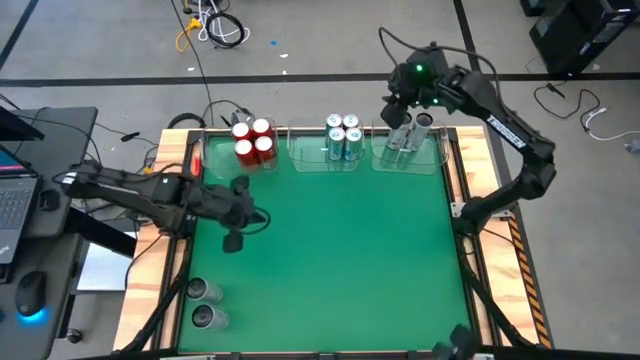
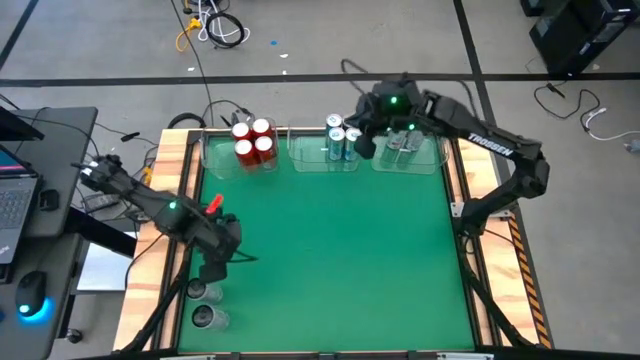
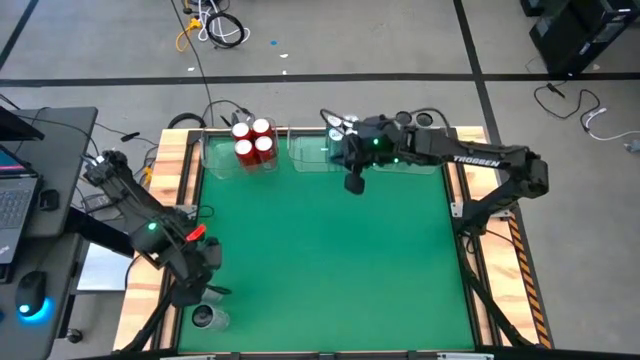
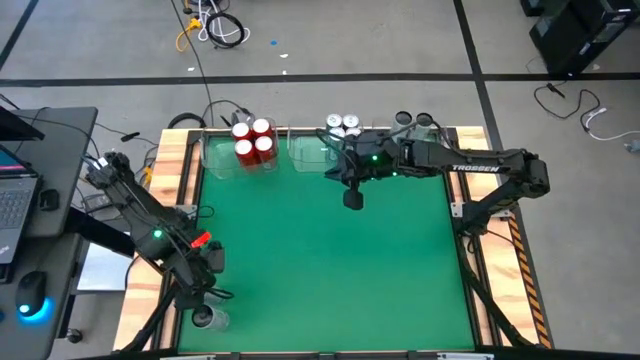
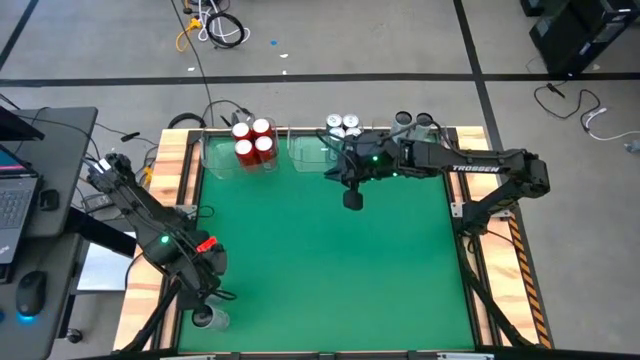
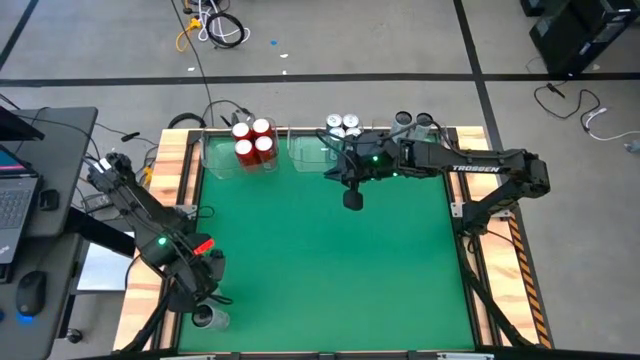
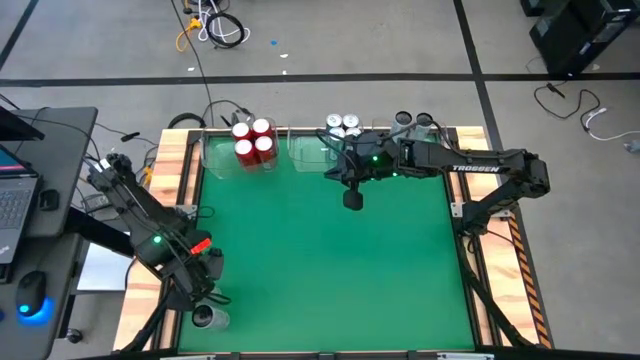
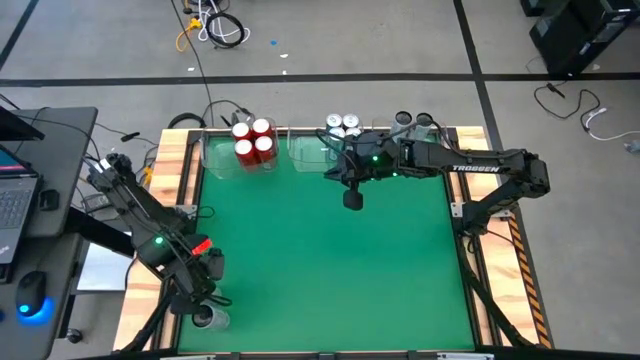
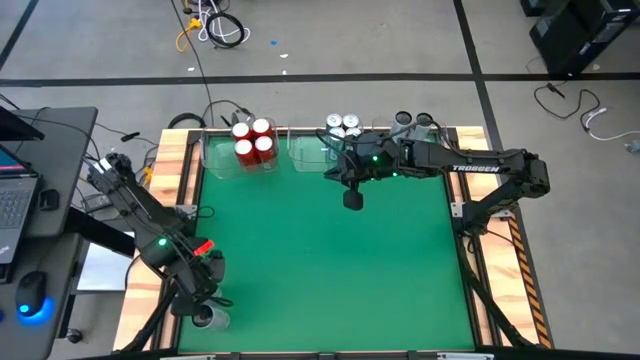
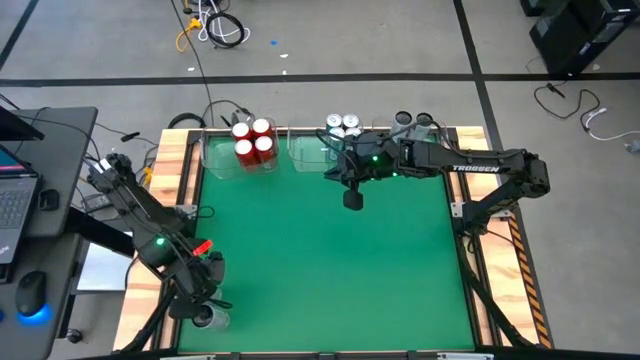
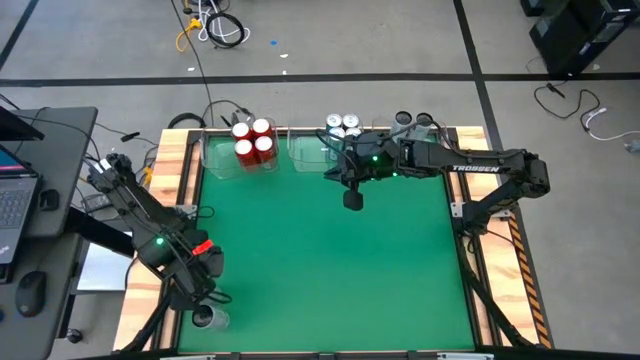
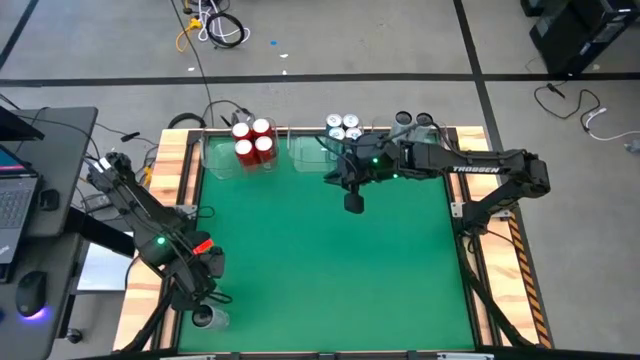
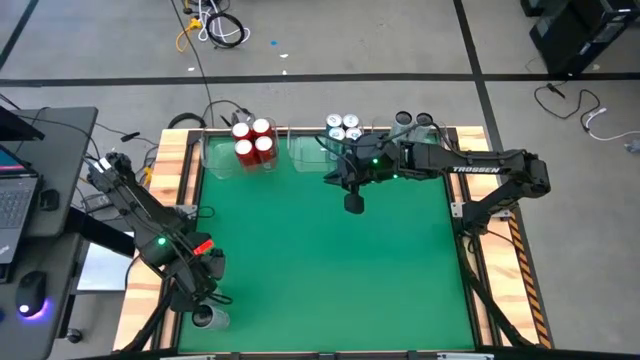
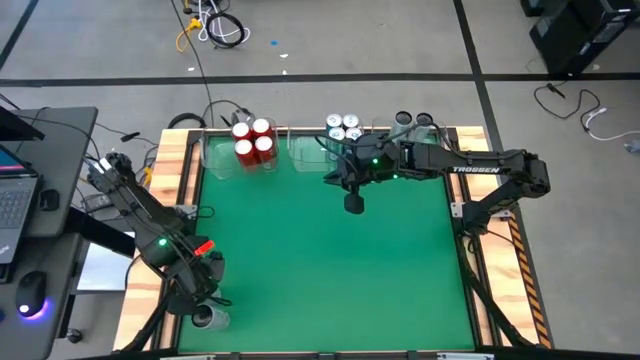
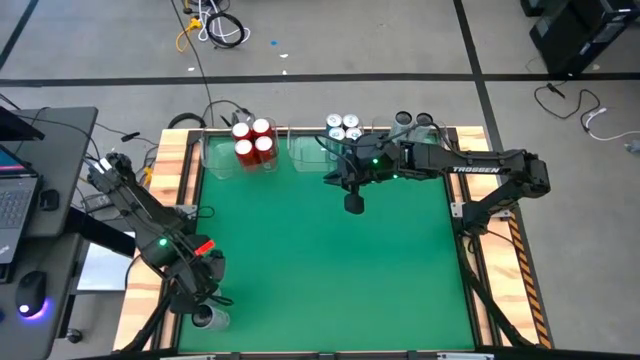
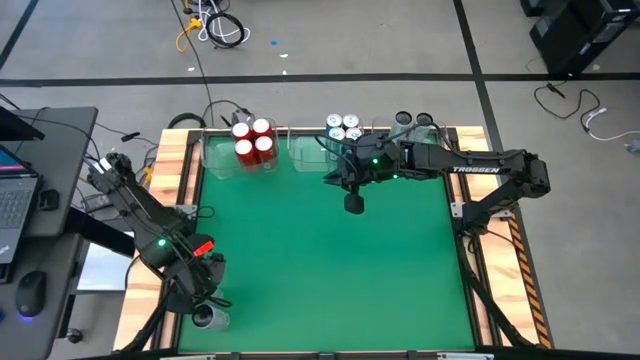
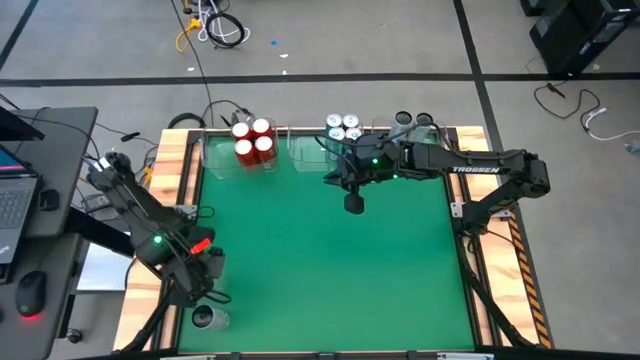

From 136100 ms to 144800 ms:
Task: Sort soda cans
Put the white soda can into the transparent right bin

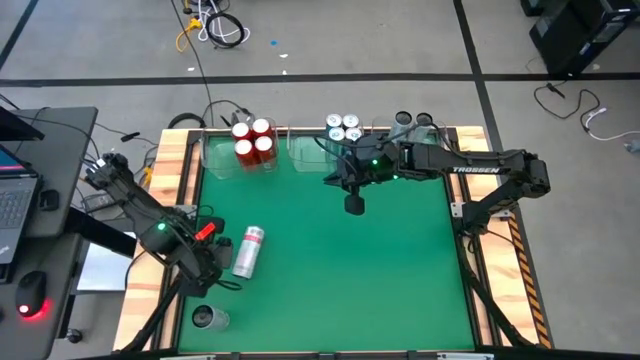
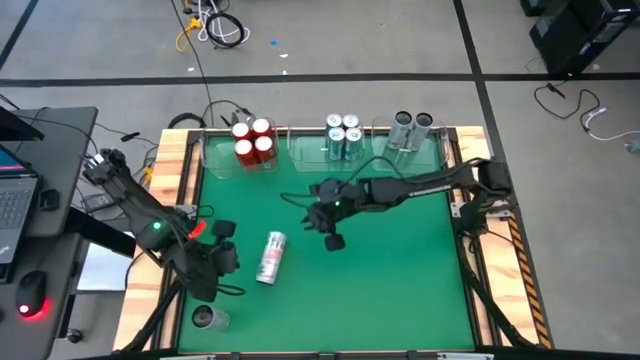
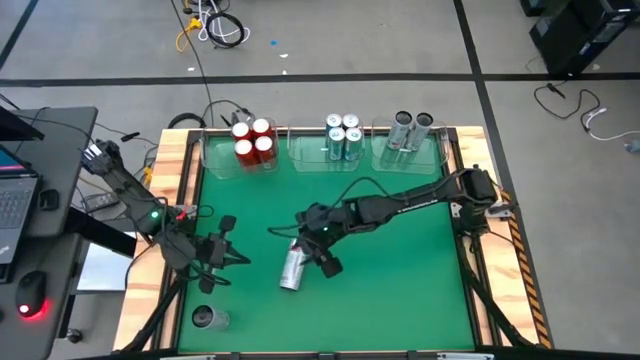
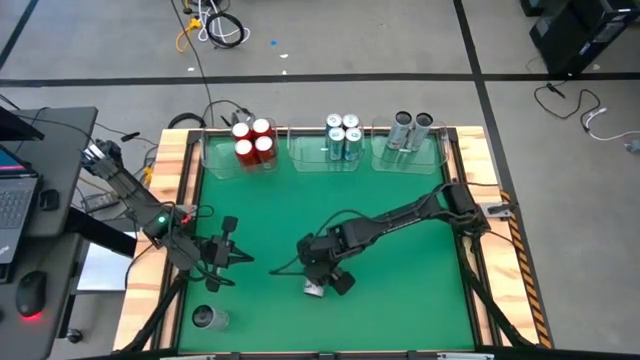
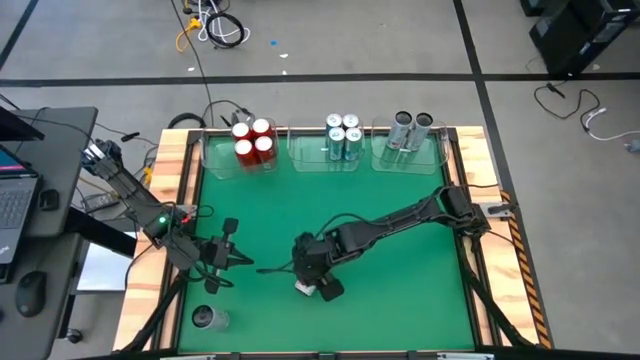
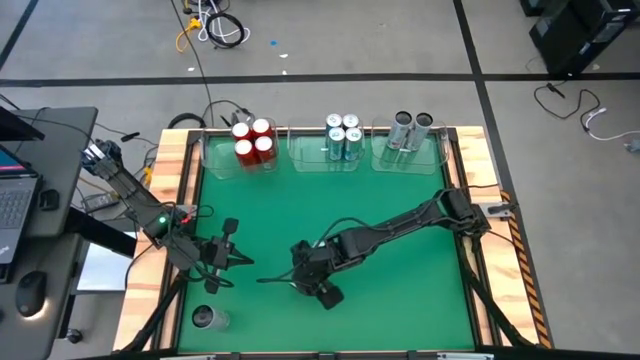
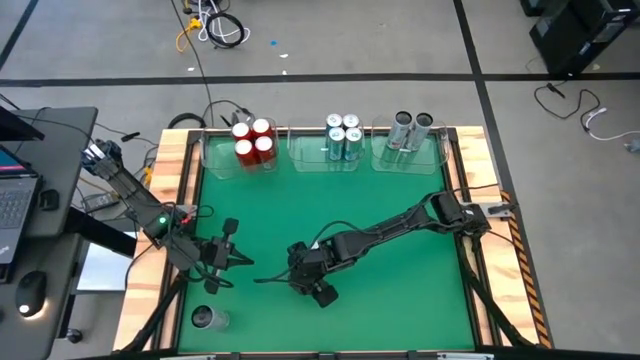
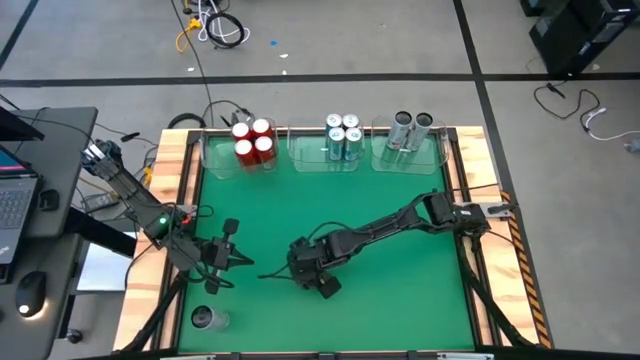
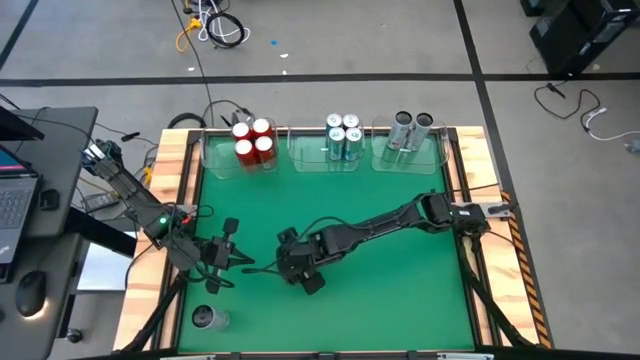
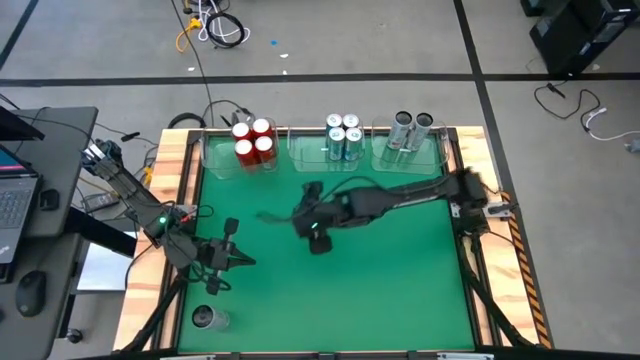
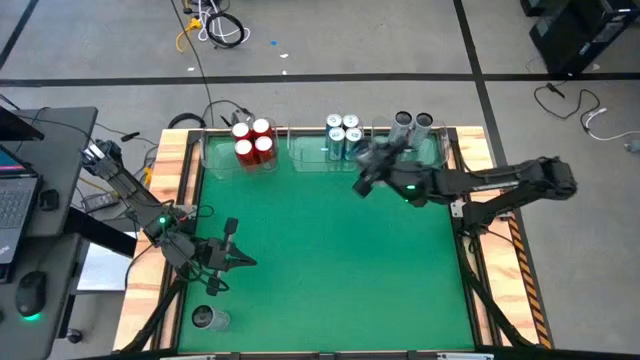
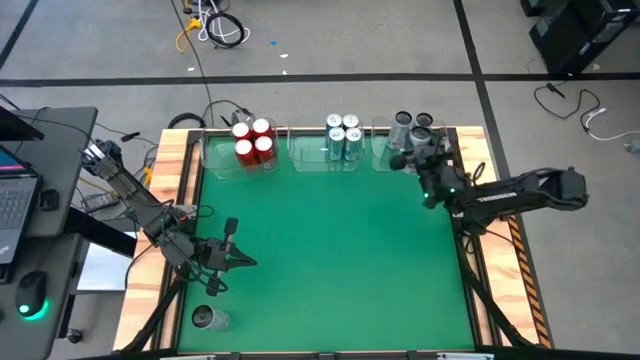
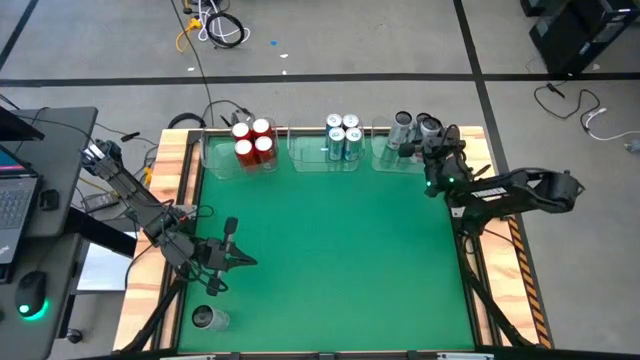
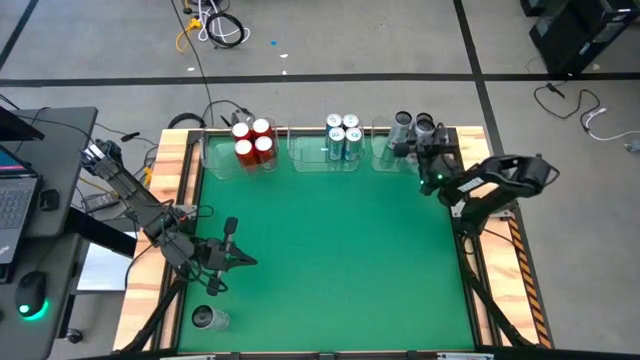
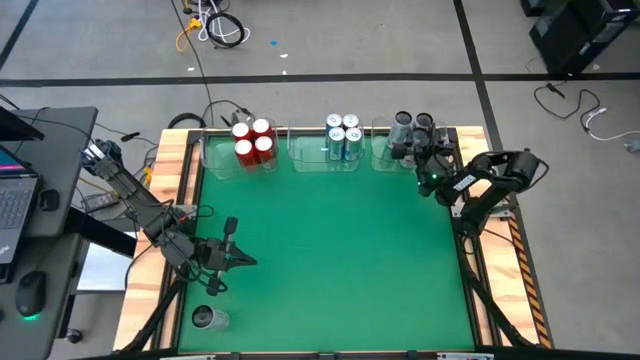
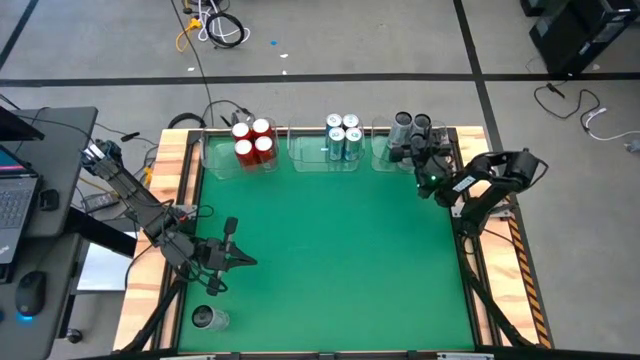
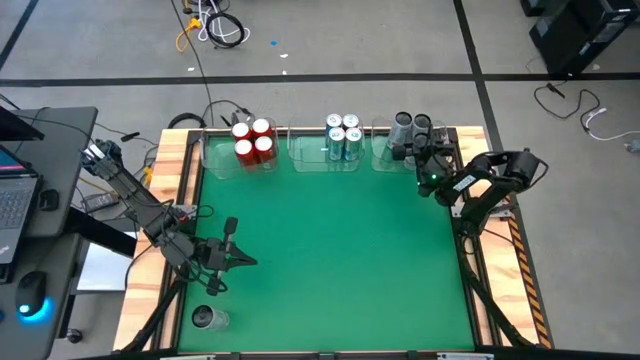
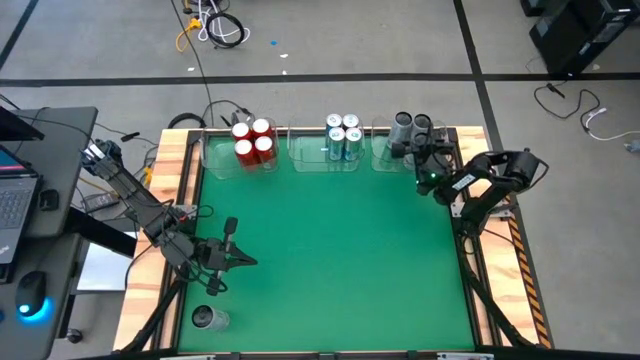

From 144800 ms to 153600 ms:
Put the white soda can into the transparent right bin

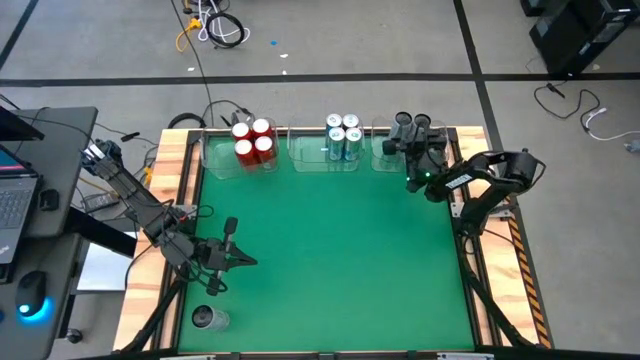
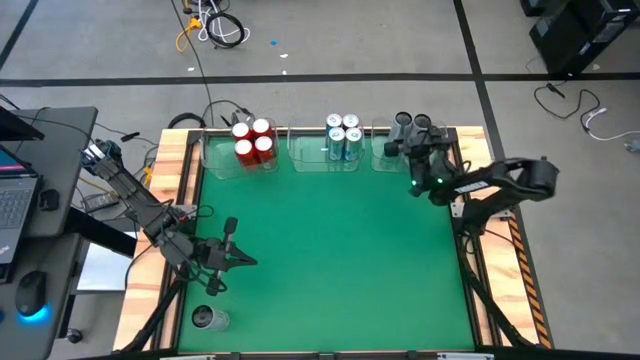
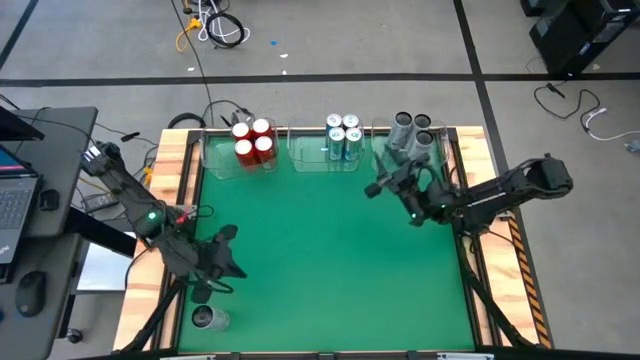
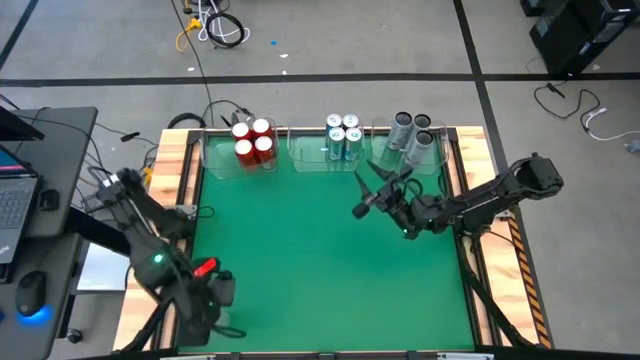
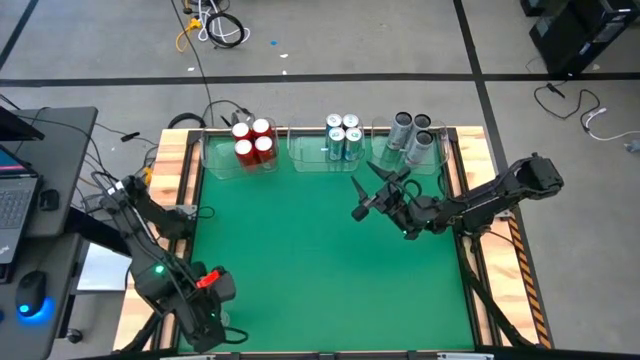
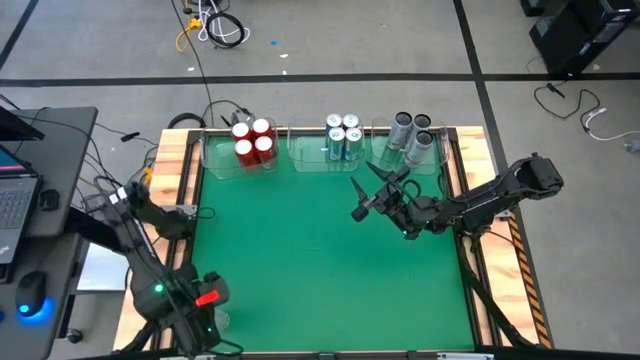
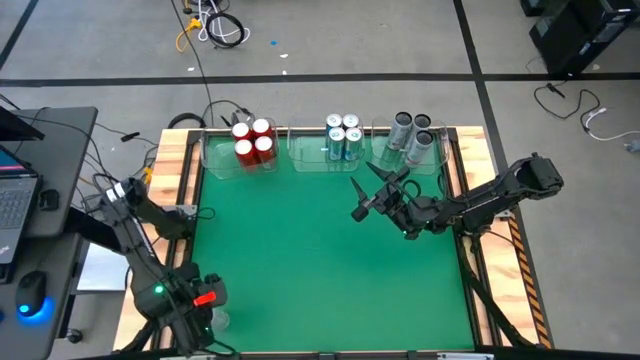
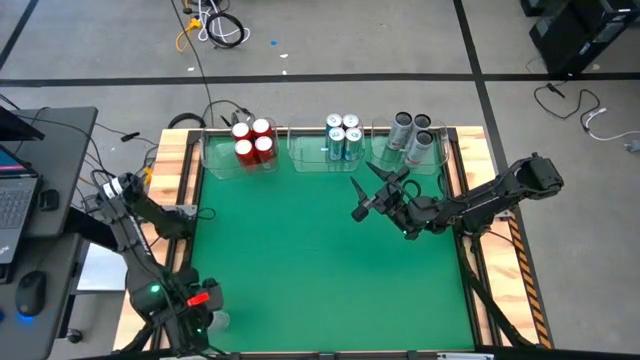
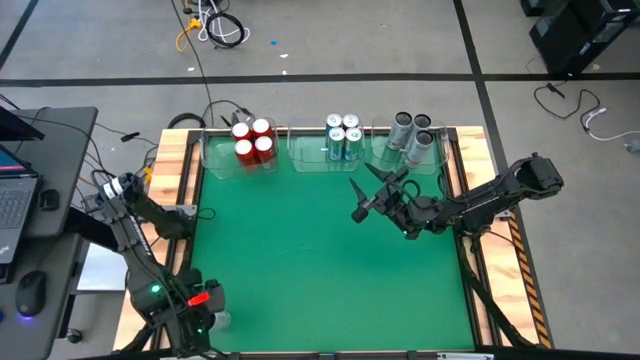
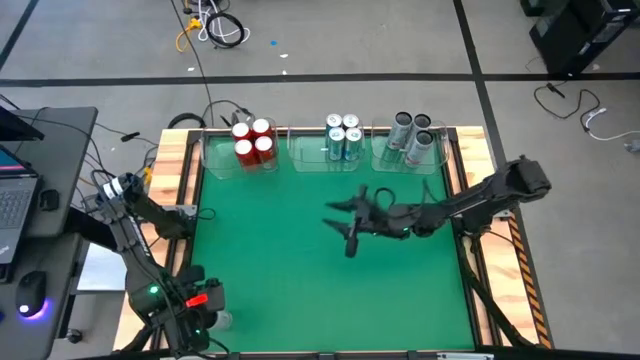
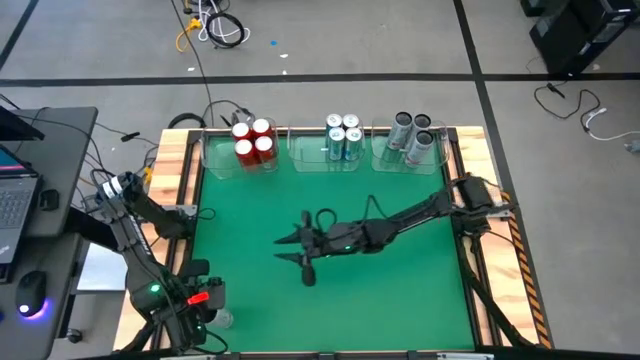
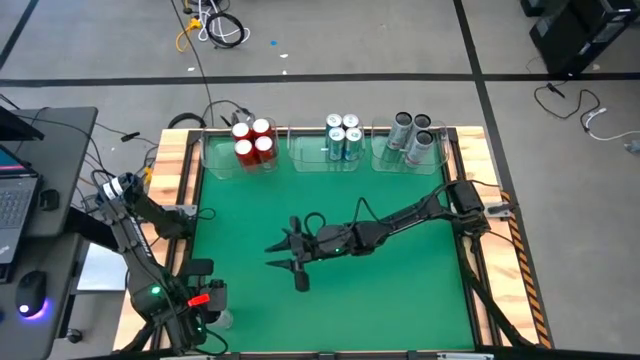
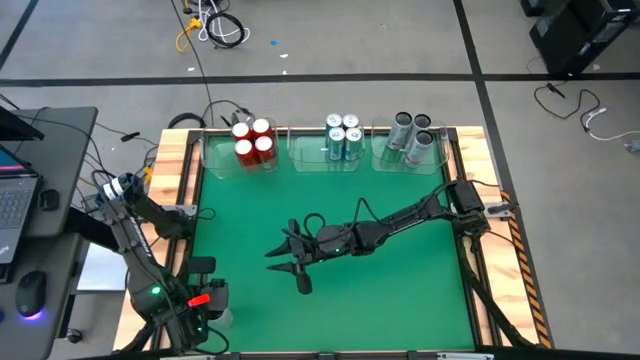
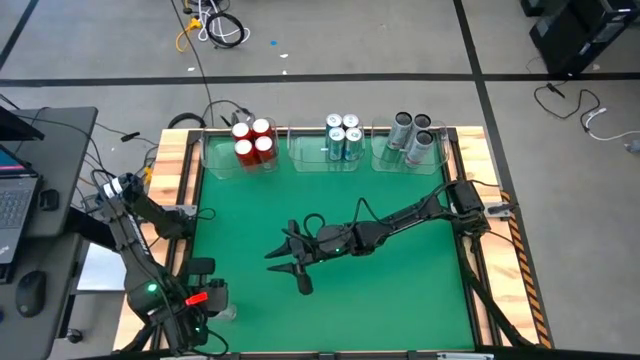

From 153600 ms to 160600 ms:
Put the white soda can into the transparent right bin
